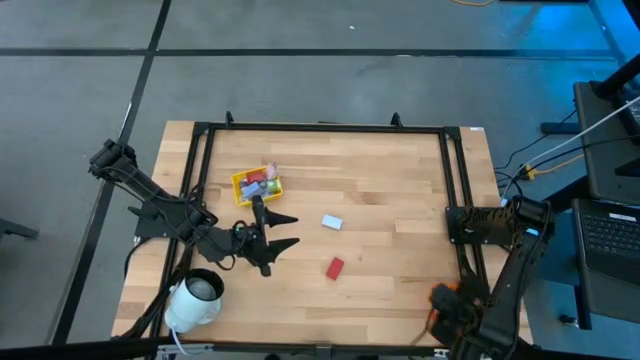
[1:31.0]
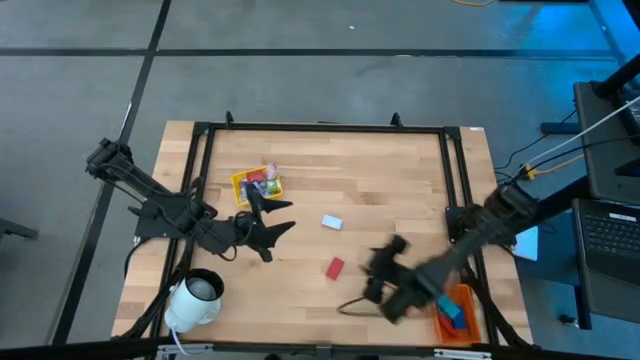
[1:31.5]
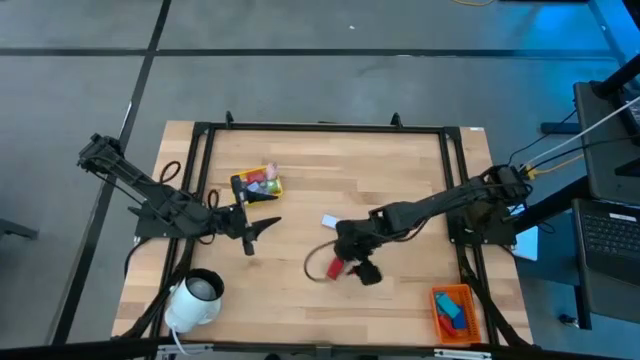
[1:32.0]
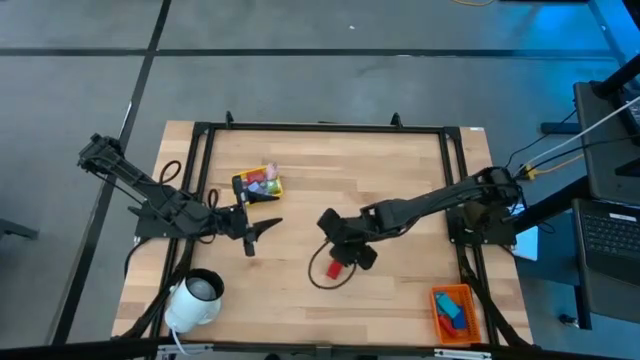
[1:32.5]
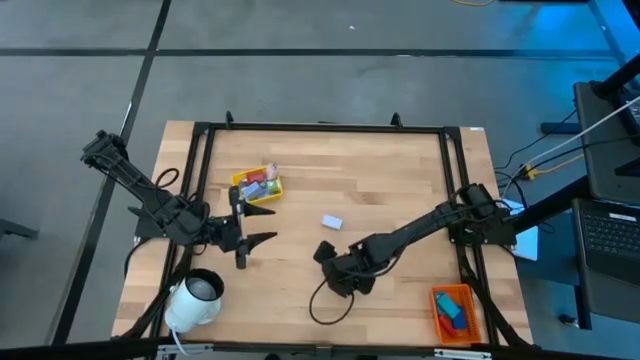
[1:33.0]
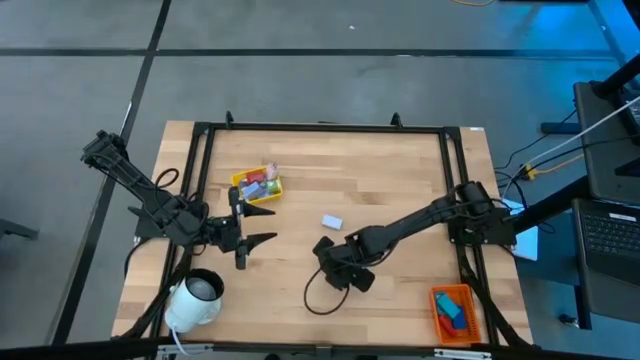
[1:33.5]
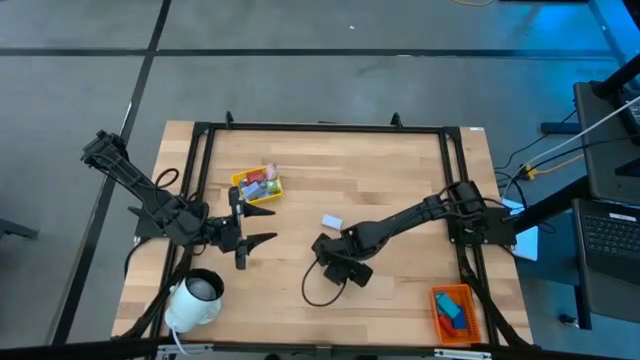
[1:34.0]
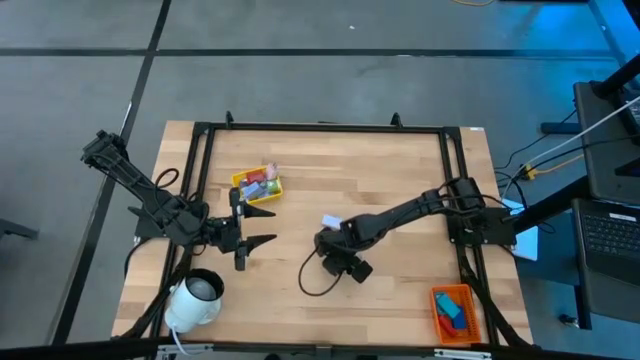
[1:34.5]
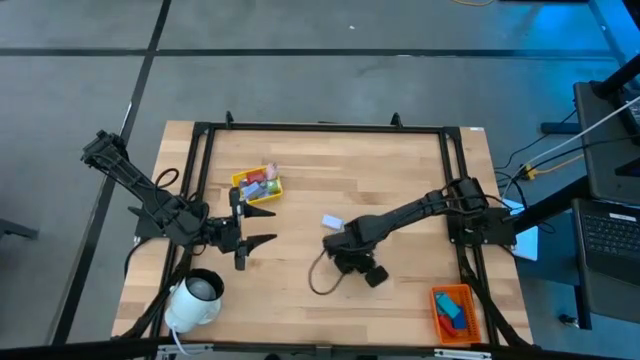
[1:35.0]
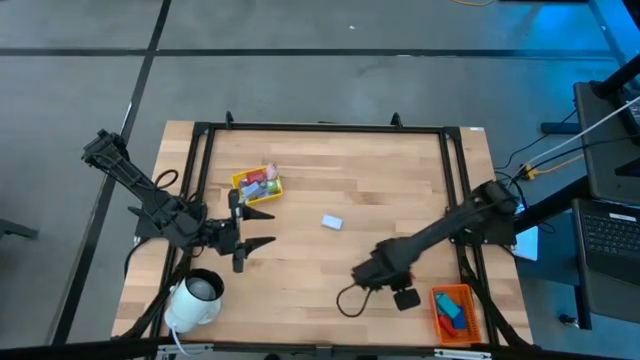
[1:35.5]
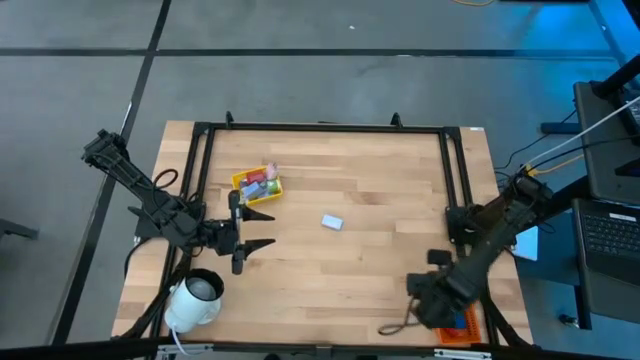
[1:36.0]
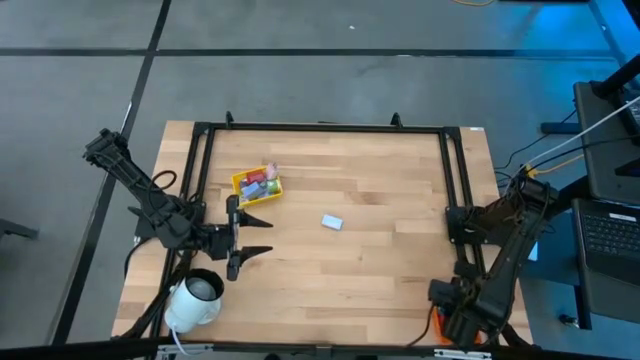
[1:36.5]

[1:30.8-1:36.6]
Task: Pick & Place Office items
Put the red digital timer into the orange bin

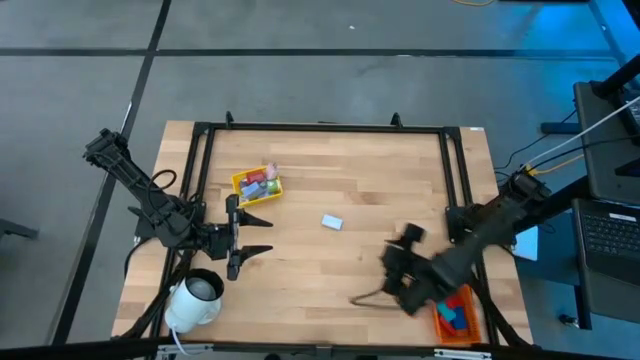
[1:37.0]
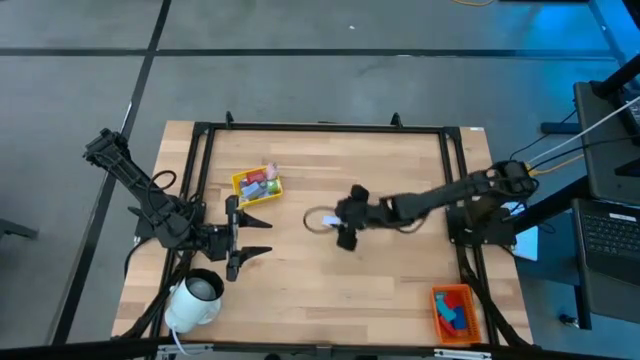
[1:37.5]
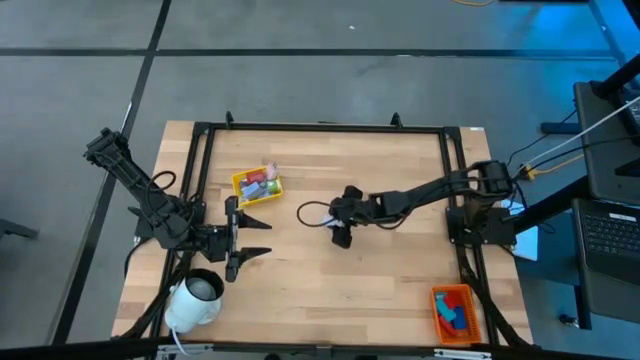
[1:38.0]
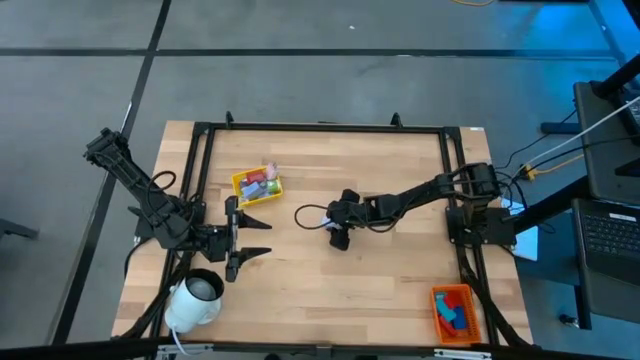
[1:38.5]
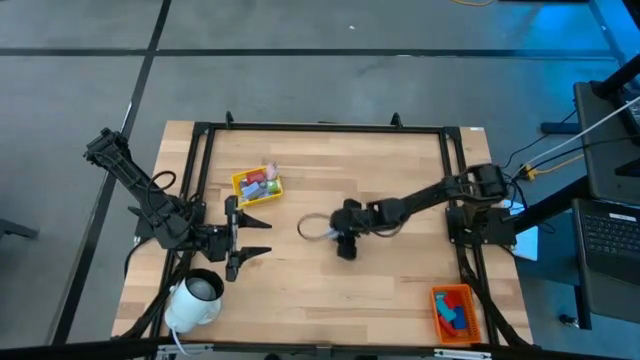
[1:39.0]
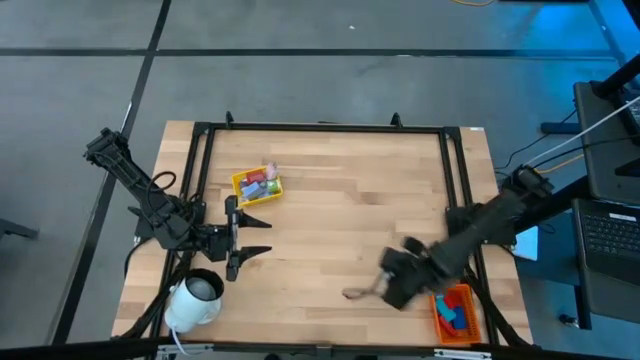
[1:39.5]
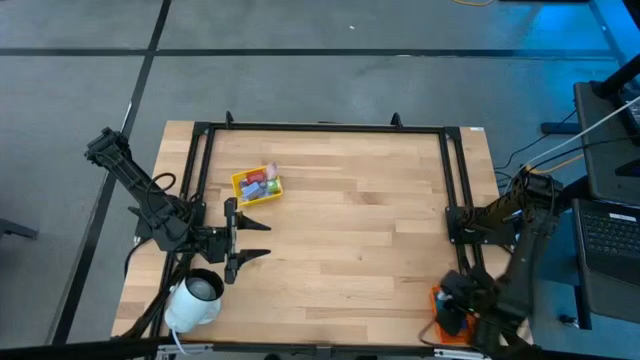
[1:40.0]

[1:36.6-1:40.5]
Put the white digital timer into the orange bin

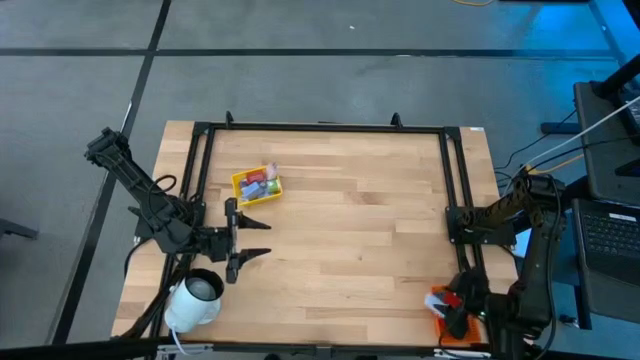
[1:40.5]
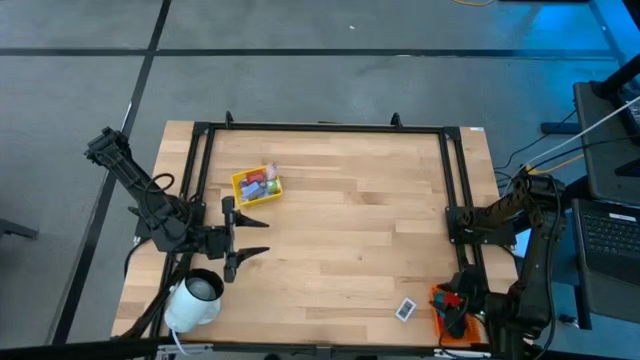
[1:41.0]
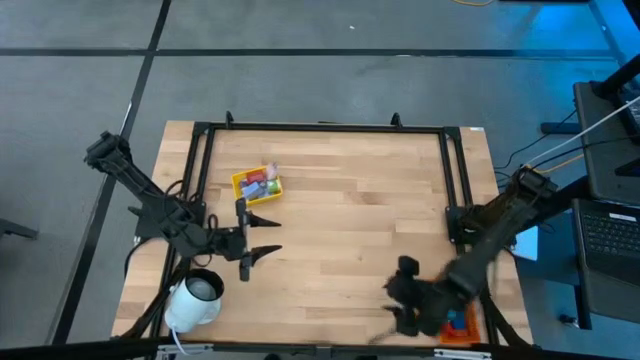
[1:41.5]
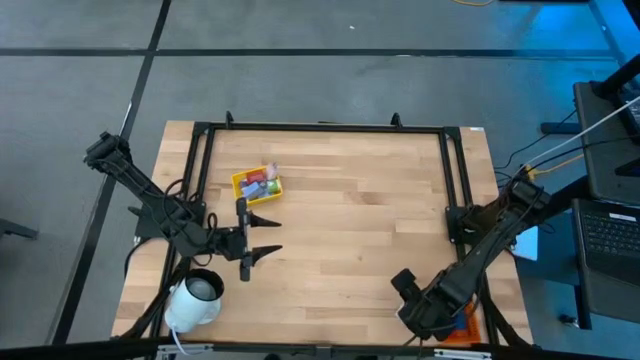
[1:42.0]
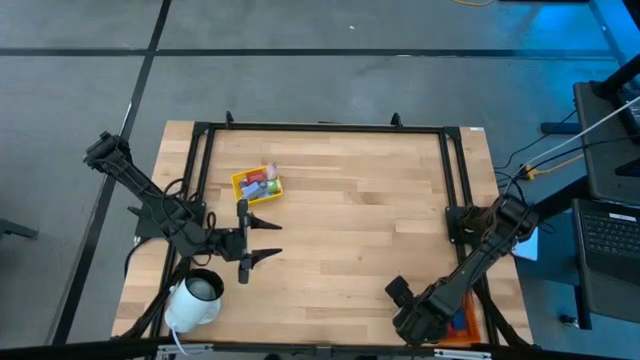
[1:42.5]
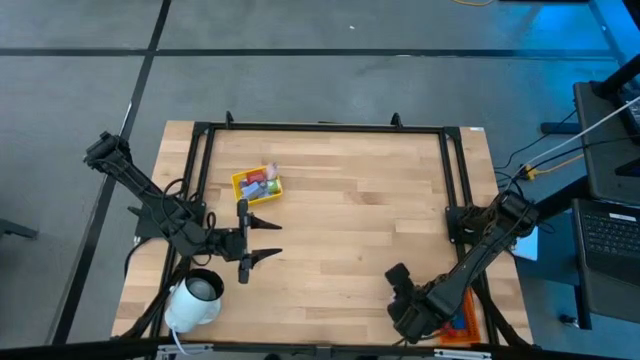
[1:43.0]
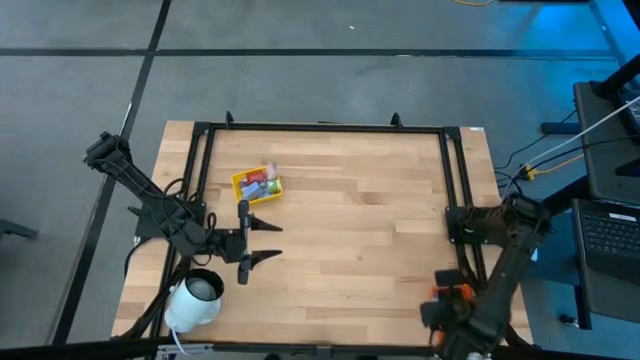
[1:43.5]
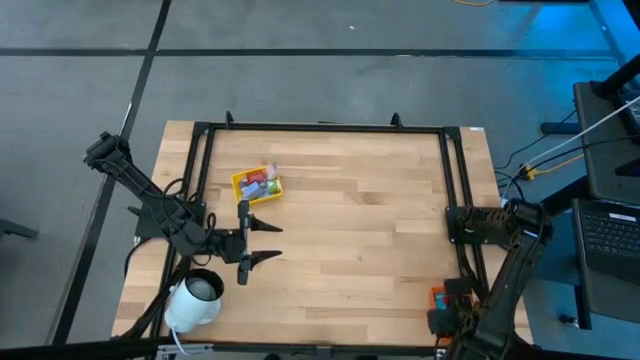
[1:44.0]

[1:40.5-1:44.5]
Put the white digital timer into the orange bin

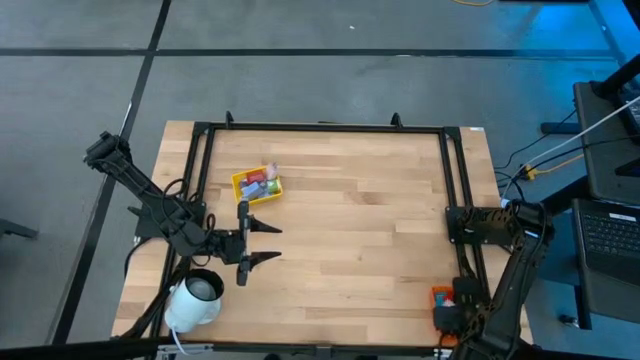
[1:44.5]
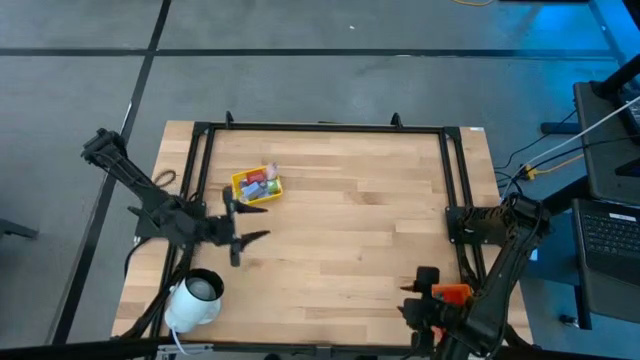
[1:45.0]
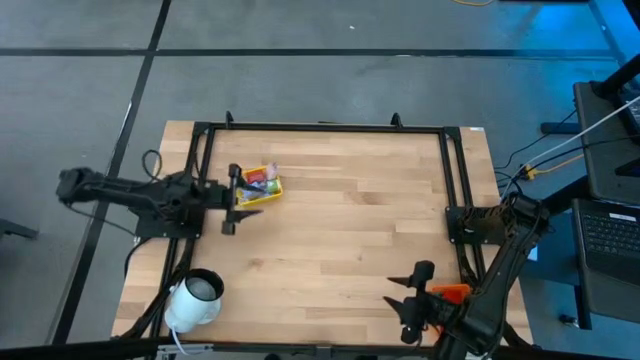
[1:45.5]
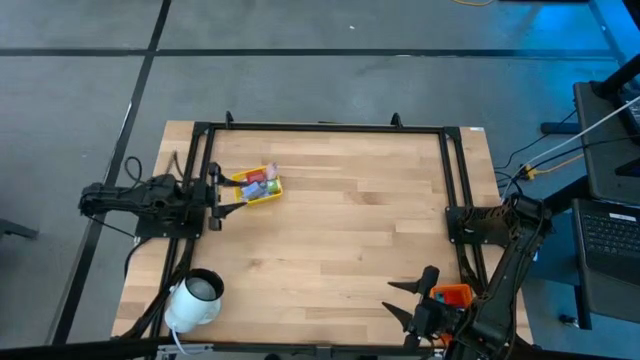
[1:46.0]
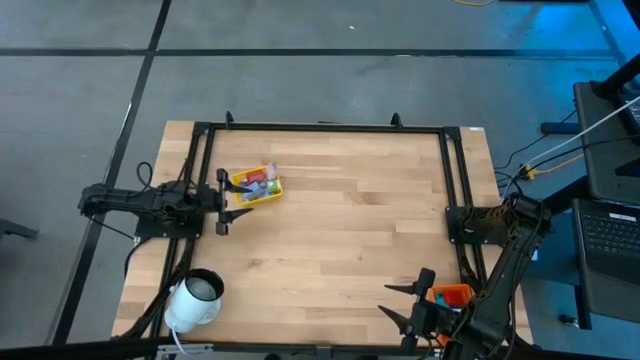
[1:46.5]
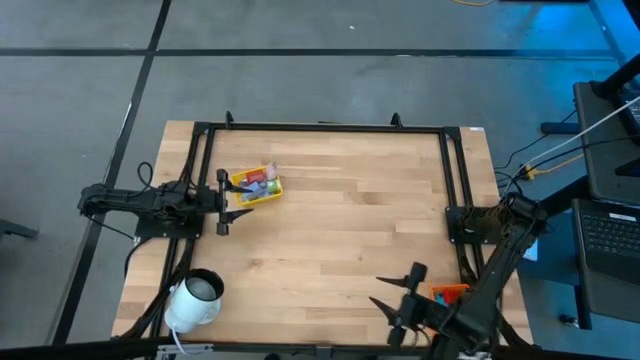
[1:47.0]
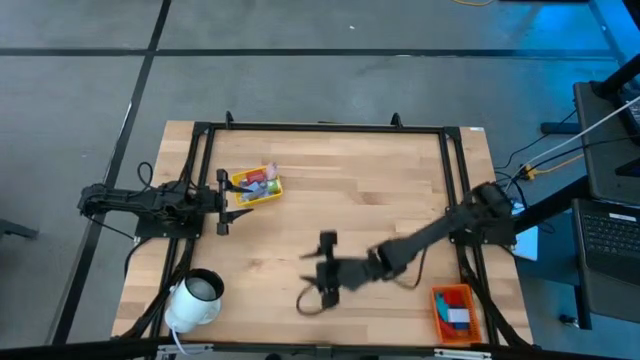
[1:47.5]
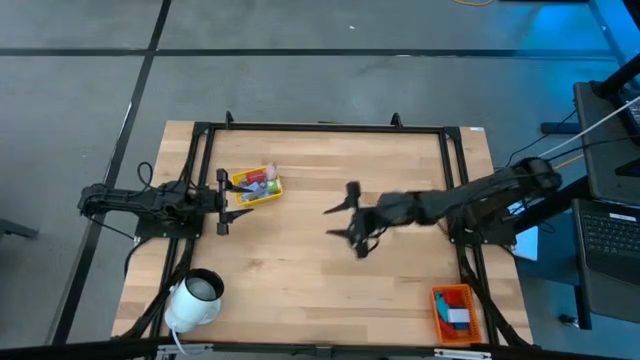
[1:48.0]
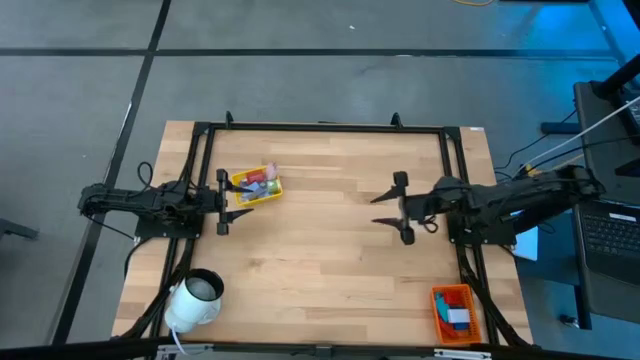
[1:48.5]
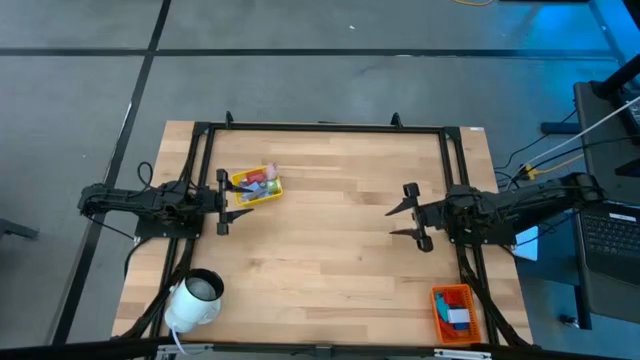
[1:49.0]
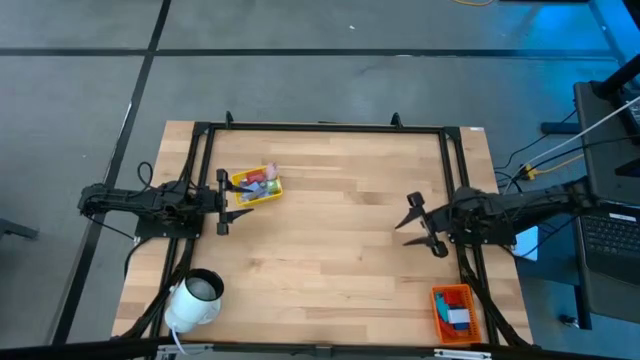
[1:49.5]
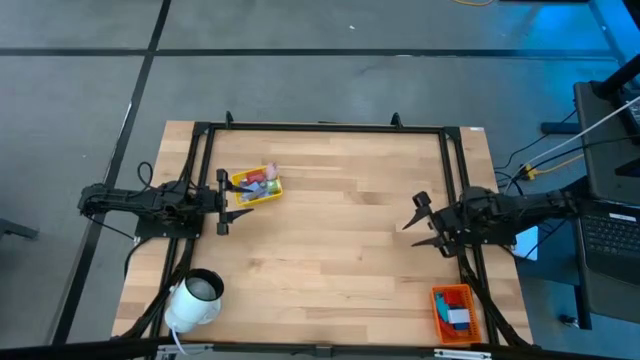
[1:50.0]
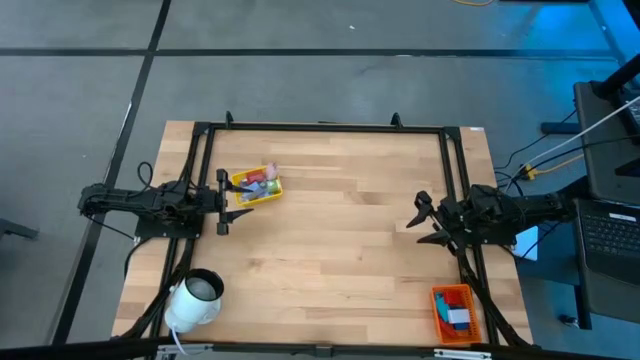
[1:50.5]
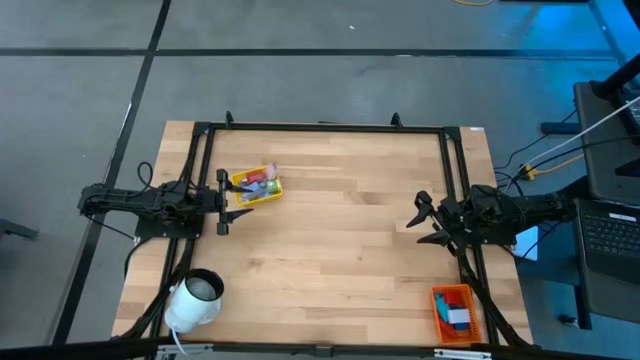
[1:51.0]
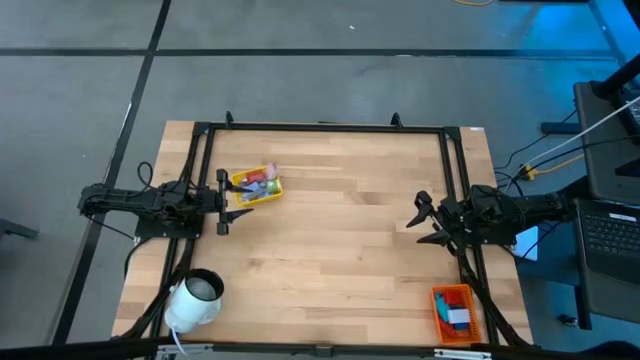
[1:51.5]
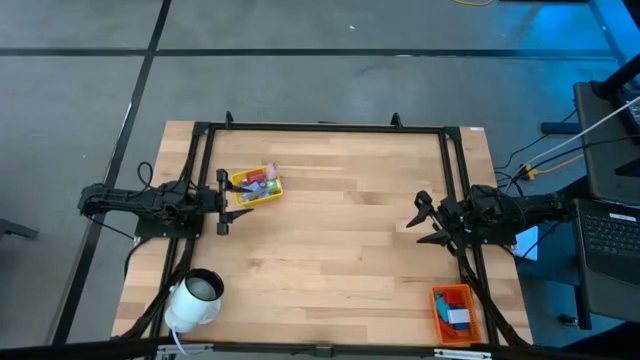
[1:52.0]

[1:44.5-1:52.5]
Return to Home Position
